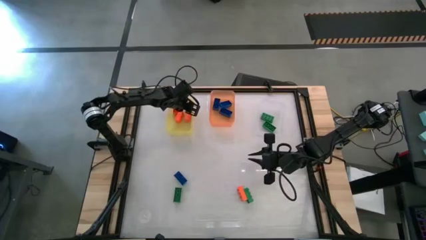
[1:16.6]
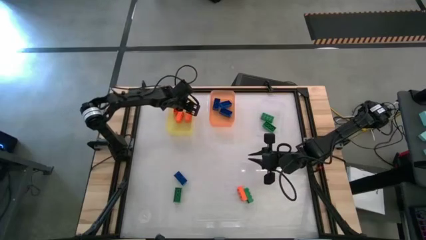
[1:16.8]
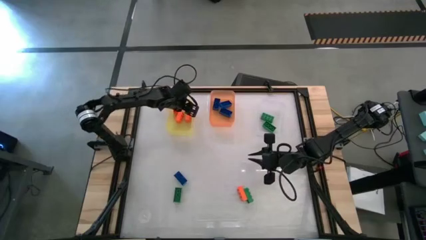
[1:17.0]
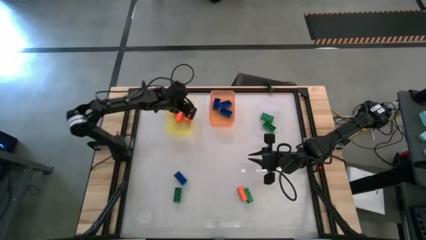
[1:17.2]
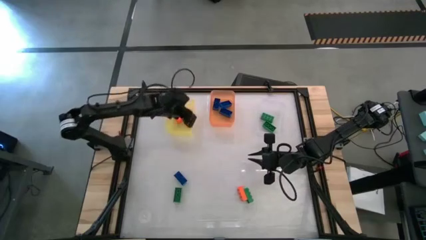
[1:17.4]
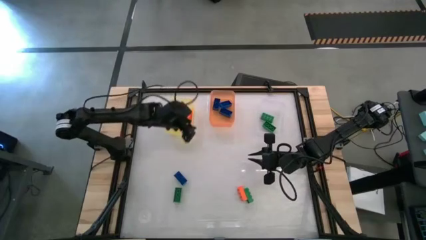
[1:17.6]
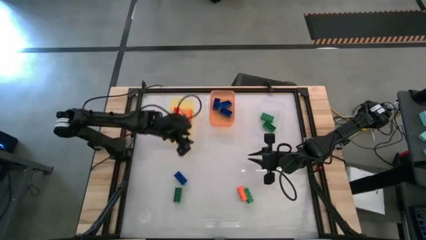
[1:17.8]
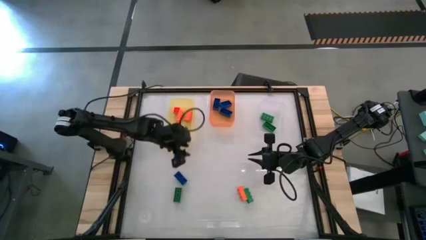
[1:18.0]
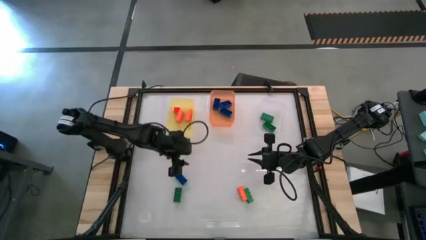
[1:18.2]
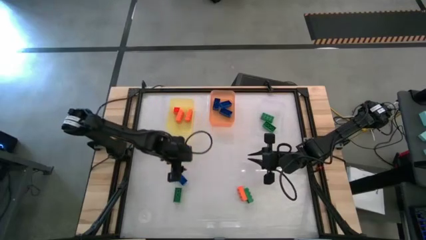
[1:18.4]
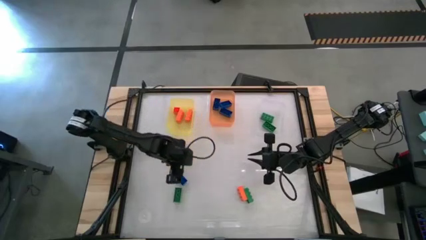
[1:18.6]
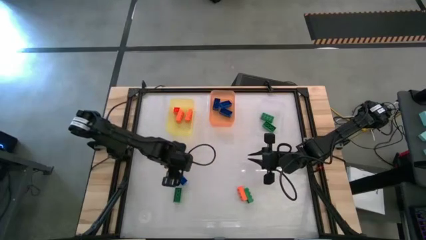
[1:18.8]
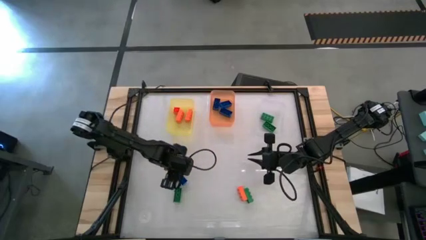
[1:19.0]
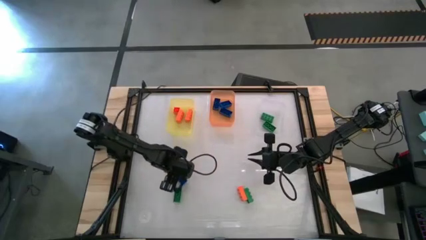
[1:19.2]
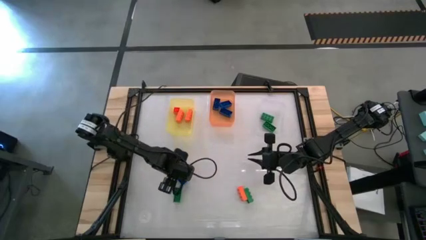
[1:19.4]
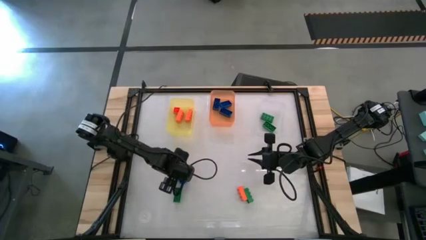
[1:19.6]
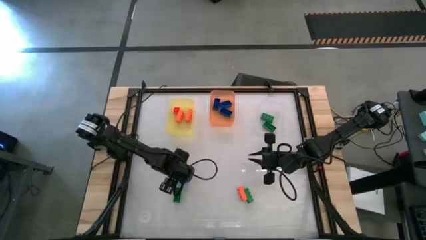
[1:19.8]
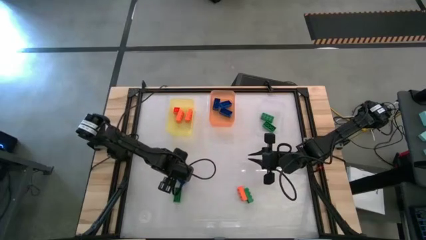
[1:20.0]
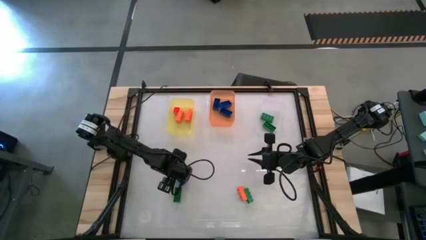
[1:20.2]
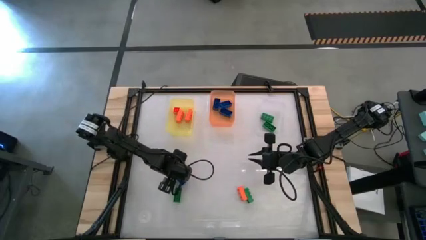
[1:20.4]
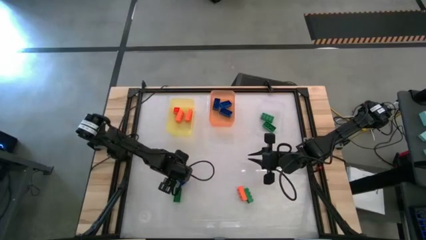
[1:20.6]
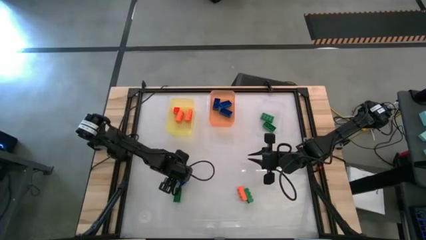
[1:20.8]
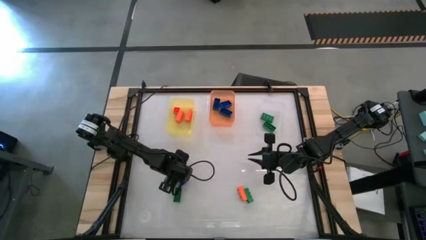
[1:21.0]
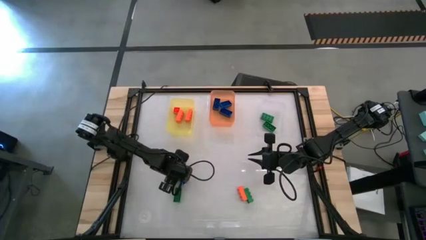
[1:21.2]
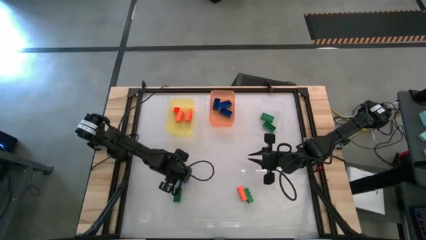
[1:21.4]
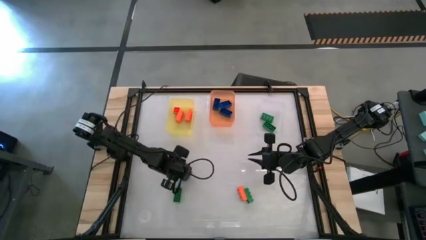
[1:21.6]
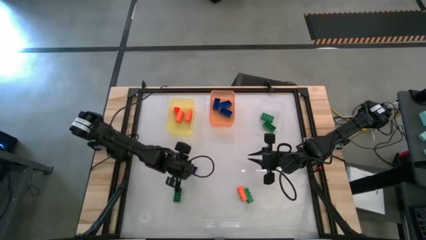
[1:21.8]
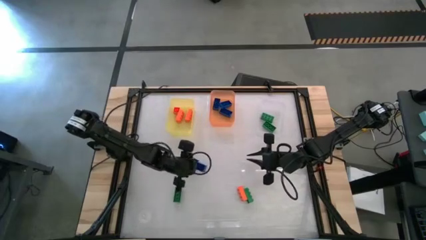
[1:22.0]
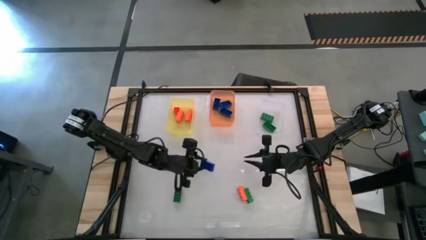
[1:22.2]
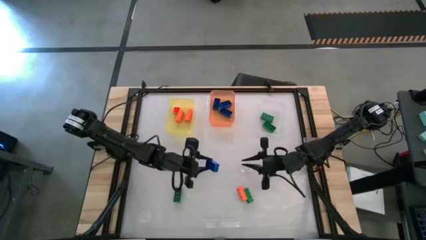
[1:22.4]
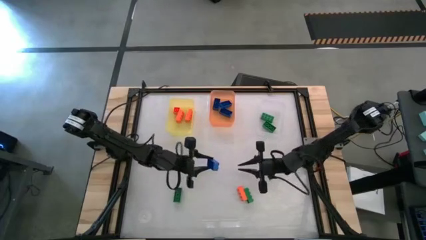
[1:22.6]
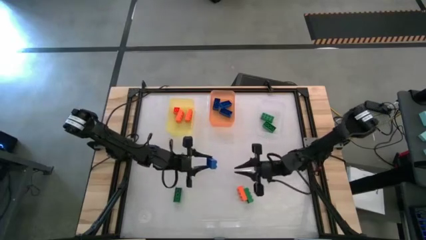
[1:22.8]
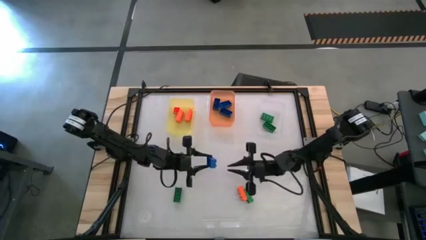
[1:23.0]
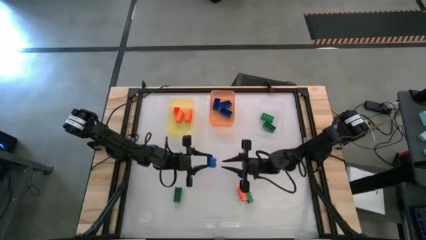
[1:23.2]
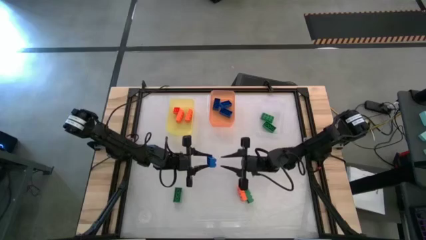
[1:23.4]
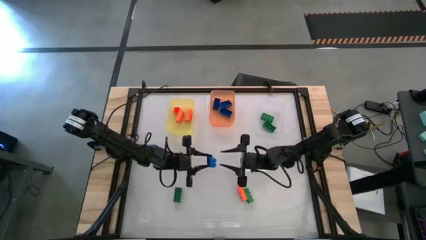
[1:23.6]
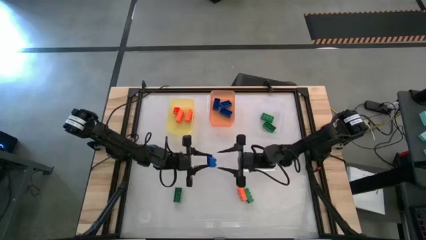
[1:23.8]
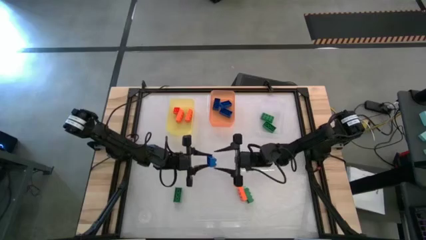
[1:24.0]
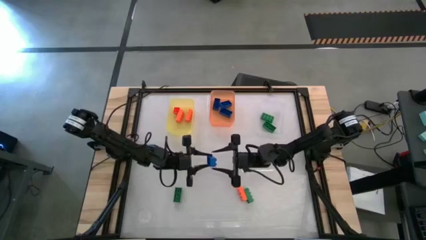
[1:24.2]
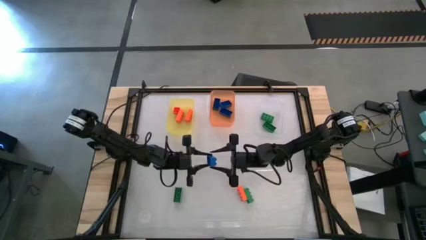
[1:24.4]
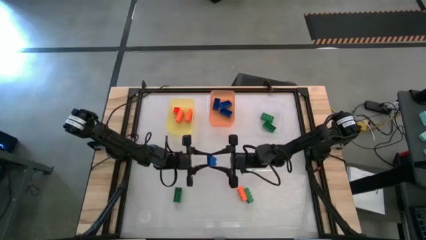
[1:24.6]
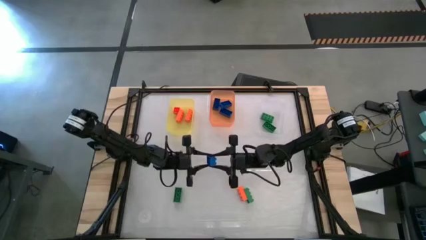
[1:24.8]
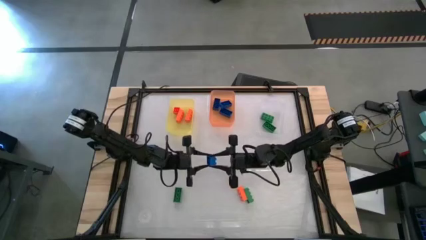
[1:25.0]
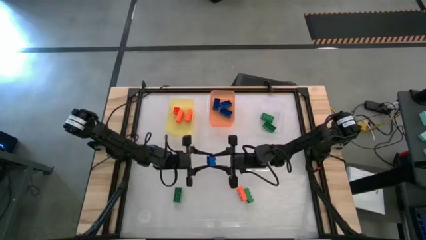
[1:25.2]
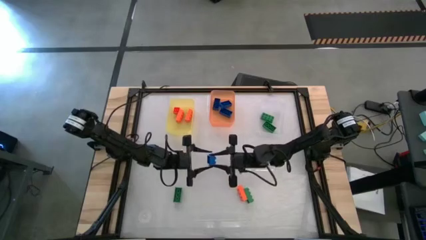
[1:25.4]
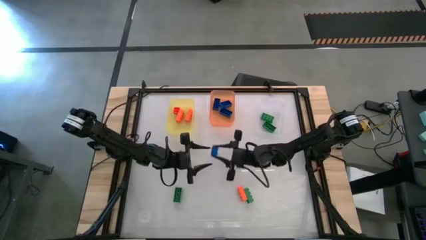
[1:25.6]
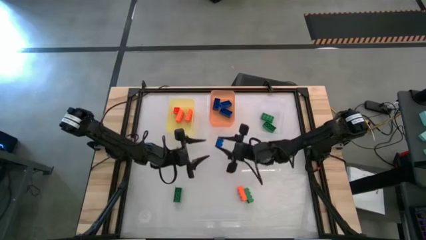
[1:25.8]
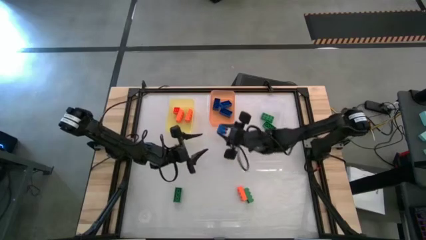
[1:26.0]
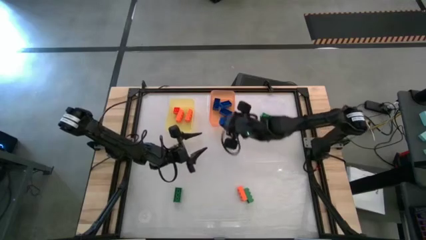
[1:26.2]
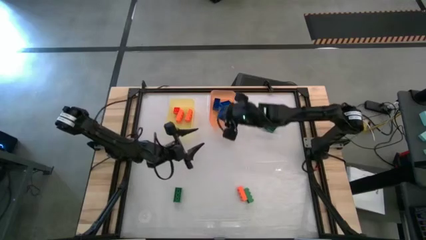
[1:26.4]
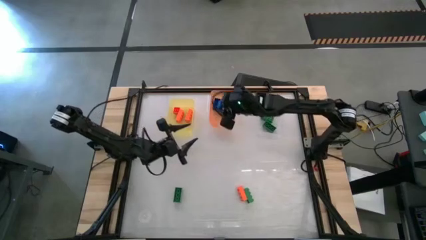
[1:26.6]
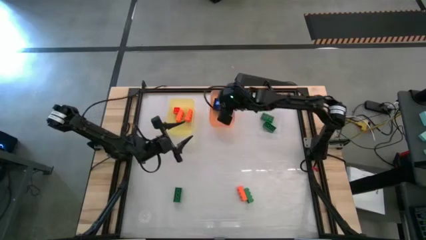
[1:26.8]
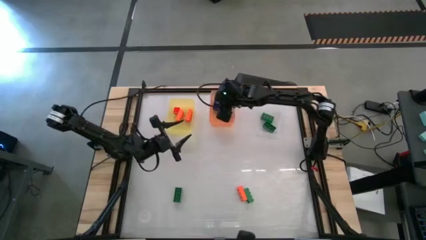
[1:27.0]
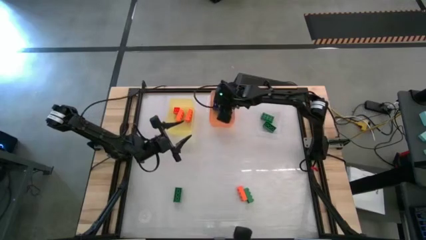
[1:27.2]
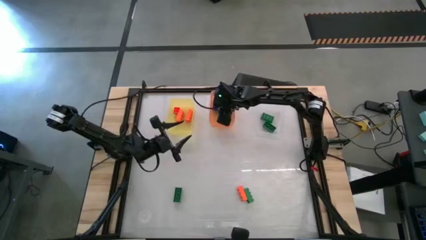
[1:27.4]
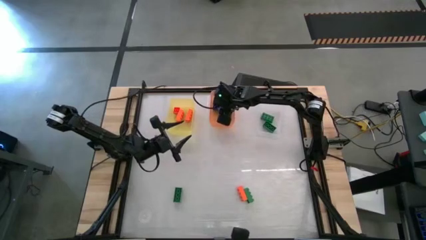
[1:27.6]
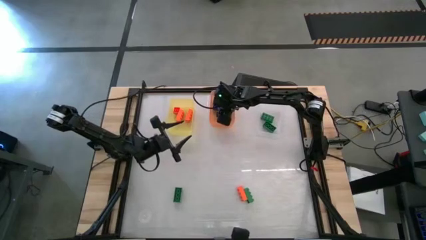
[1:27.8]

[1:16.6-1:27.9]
Task: Sort & place blocks by color
Put the blue game piece into the orange bin

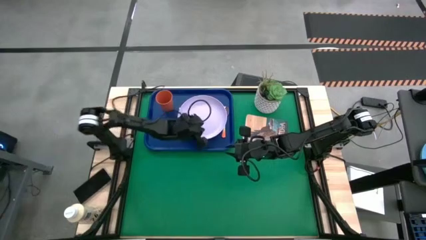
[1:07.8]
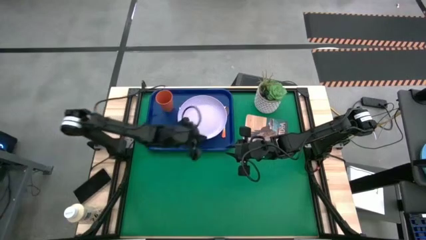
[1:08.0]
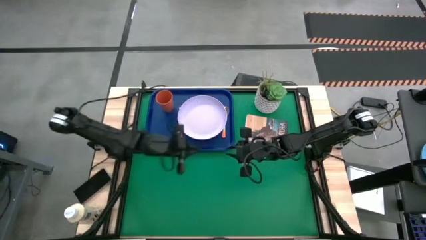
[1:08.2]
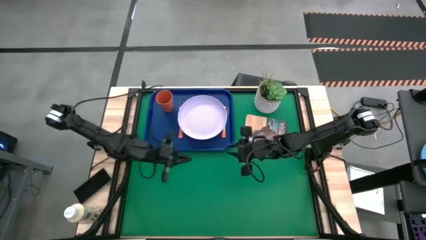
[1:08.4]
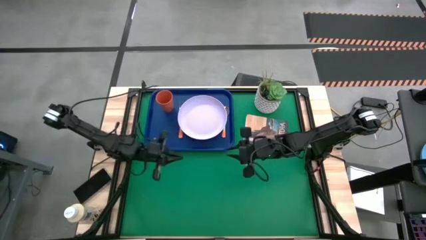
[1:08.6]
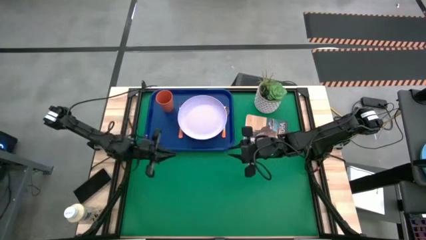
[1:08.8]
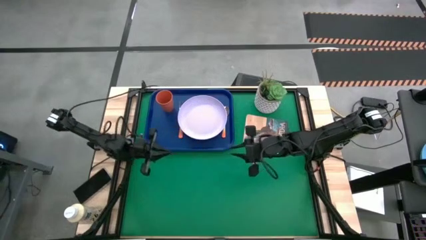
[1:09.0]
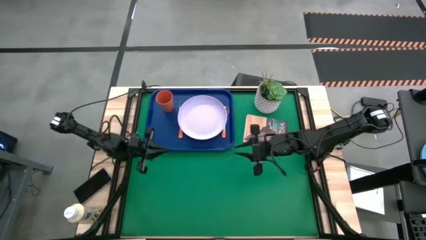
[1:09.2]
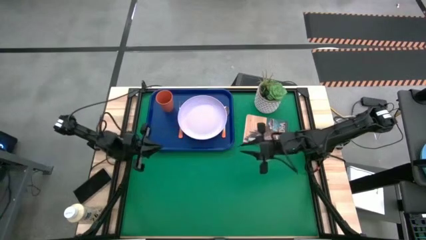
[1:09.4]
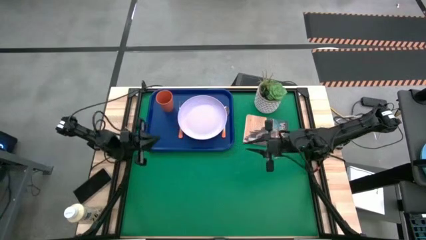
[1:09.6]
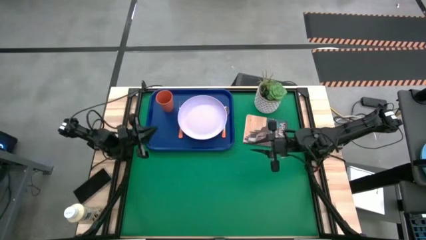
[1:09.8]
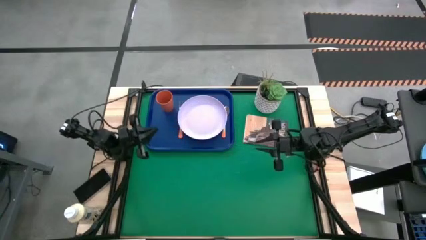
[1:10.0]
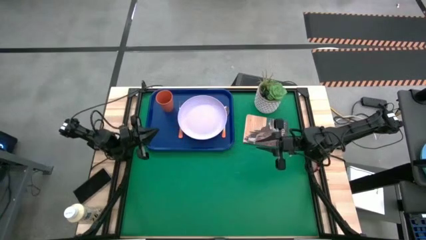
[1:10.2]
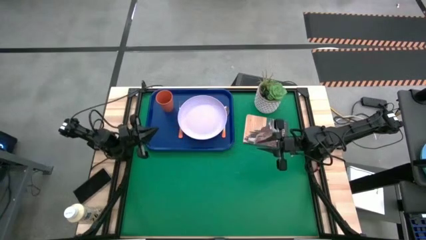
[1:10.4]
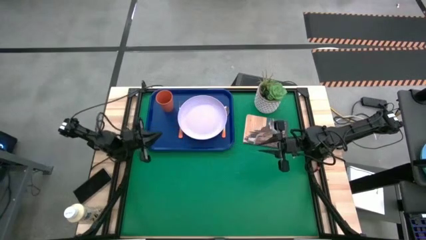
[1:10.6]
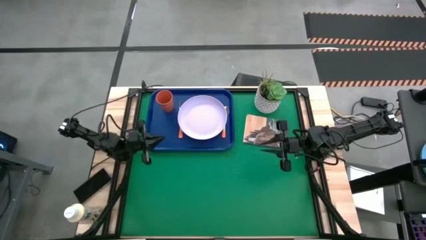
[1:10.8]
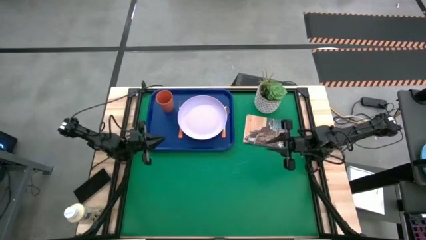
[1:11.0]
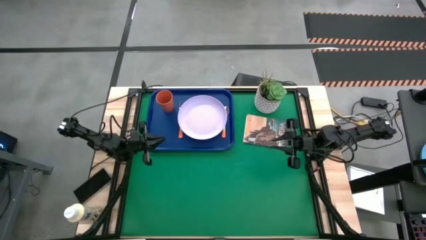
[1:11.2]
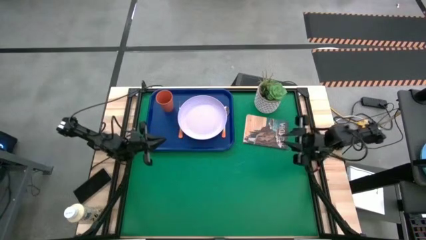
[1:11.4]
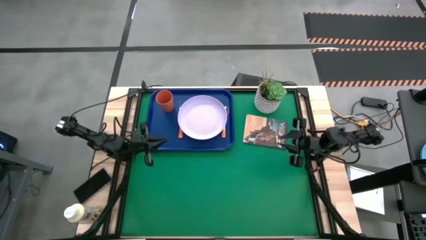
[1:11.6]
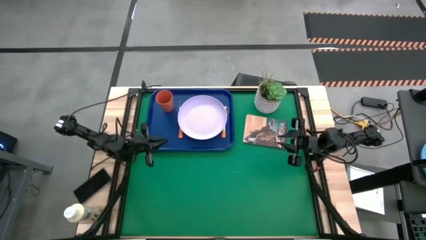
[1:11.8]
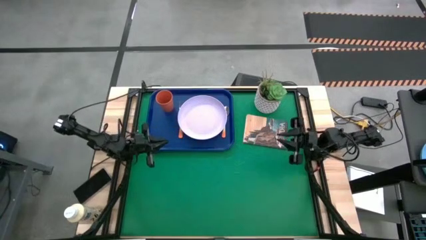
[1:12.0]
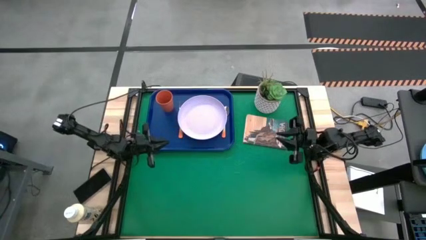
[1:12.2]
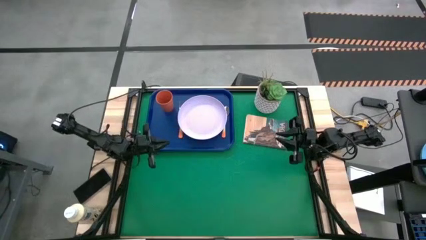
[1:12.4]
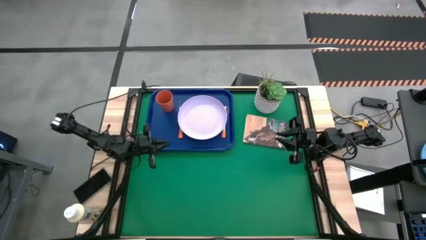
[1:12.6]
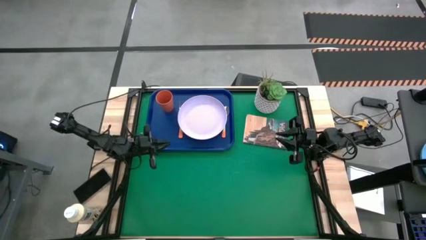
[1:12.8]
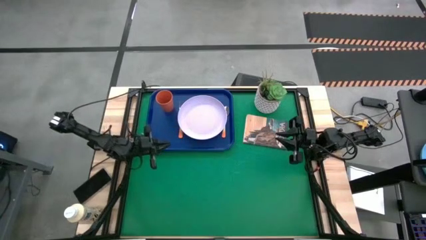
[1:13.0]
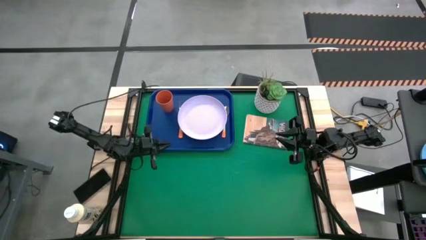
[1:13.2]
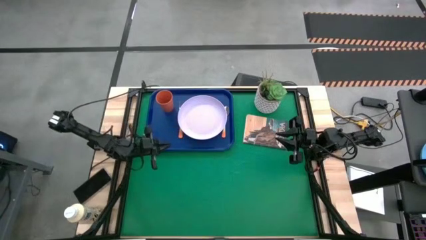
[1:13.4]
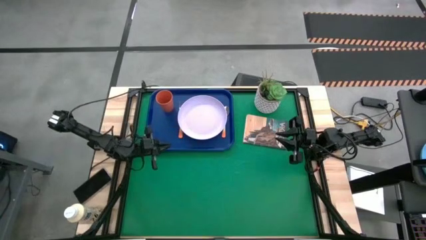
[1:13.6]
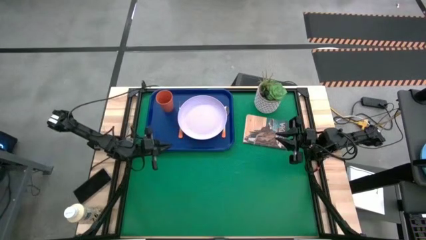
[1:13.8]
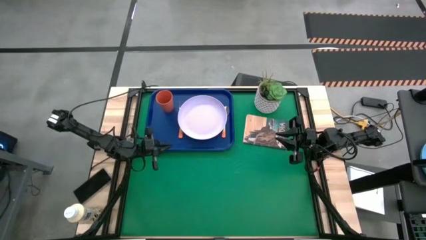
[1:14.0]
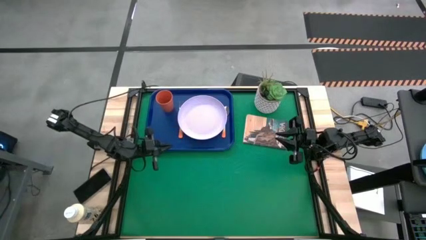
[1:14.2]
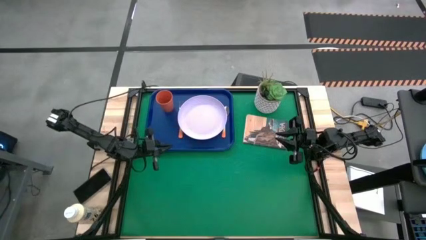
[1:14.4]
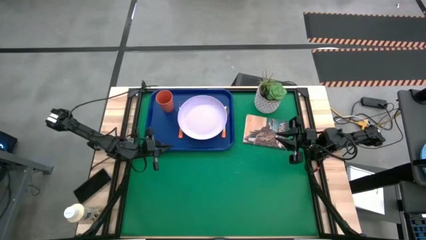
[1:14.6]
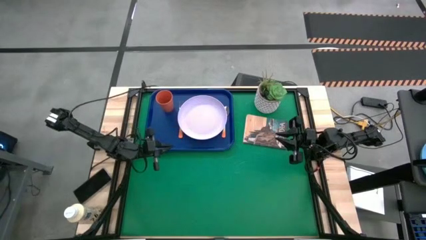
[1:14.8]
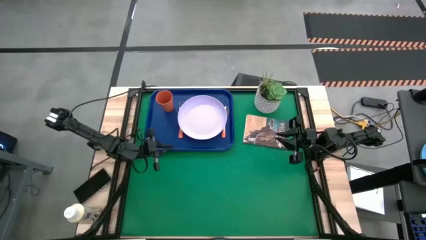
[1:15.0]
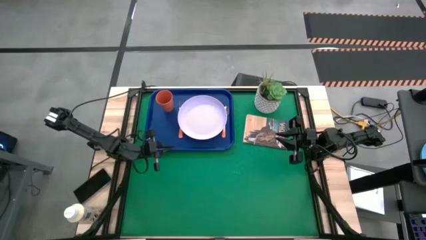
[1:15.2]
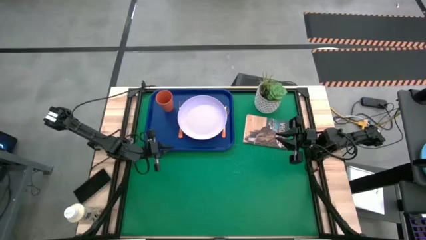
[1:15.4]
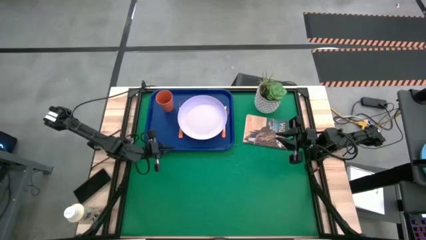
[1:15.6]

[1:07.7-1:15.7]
Task: Pick and place plate/cup/fork/spoon on tray
Return to Home Position
